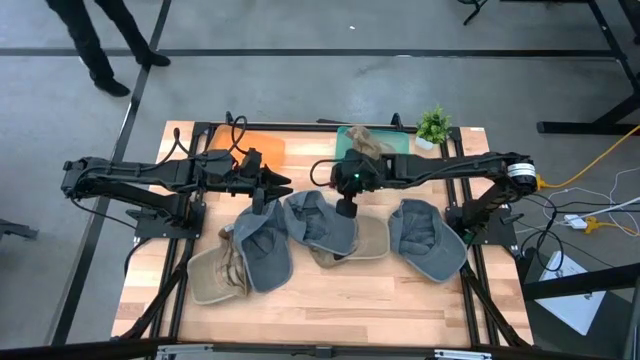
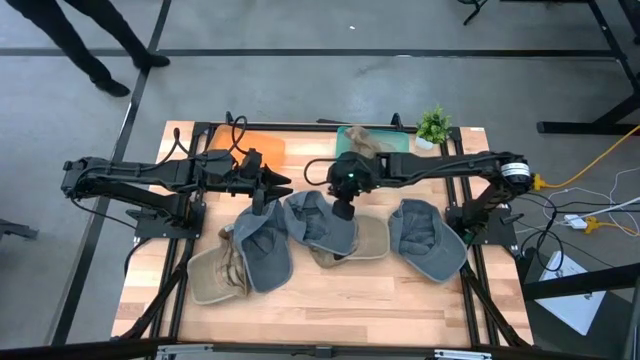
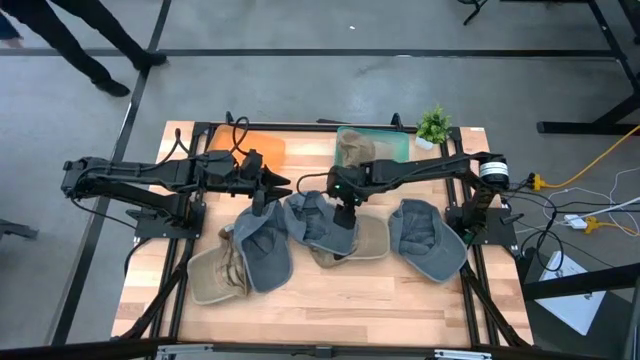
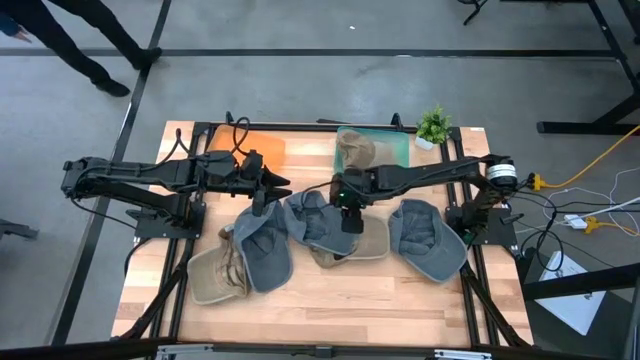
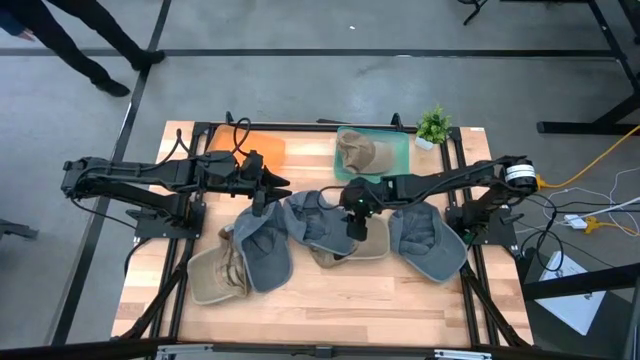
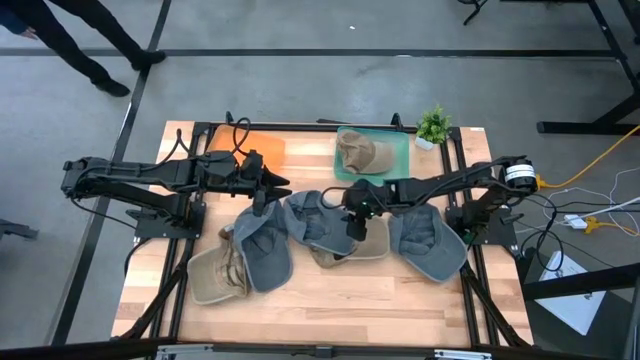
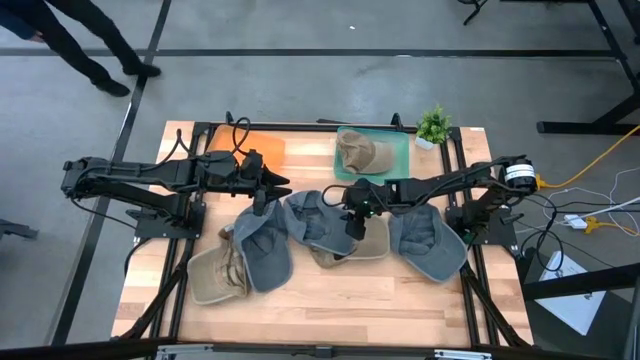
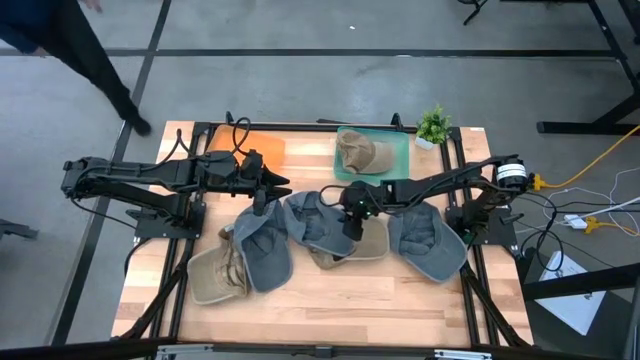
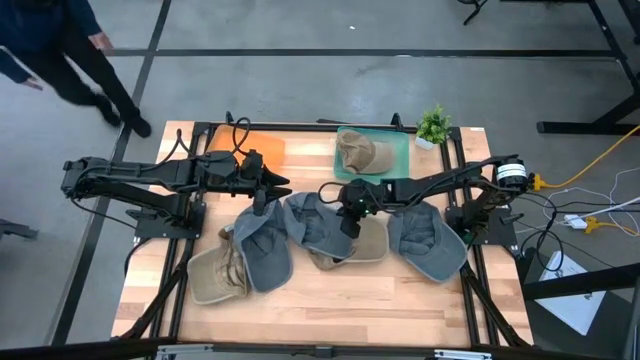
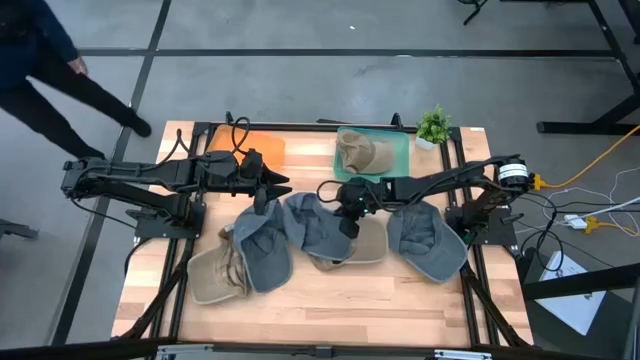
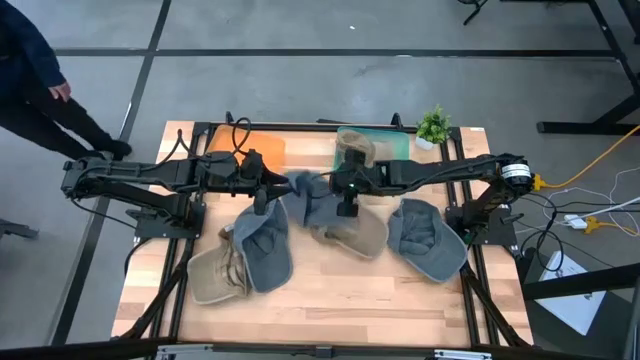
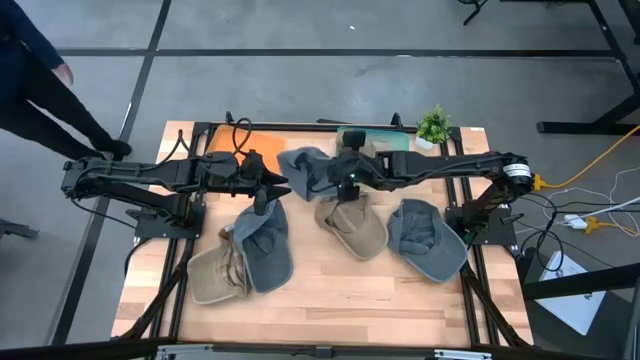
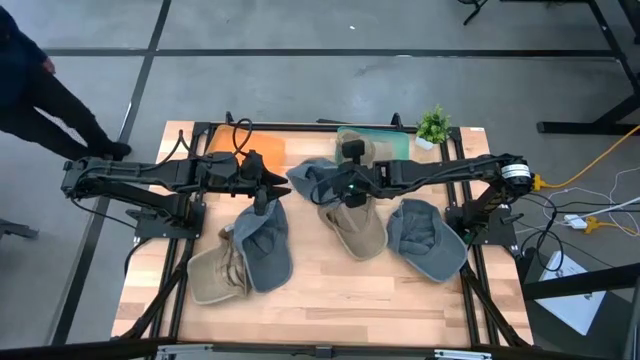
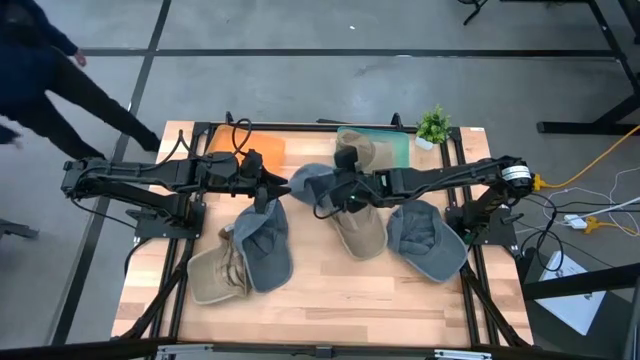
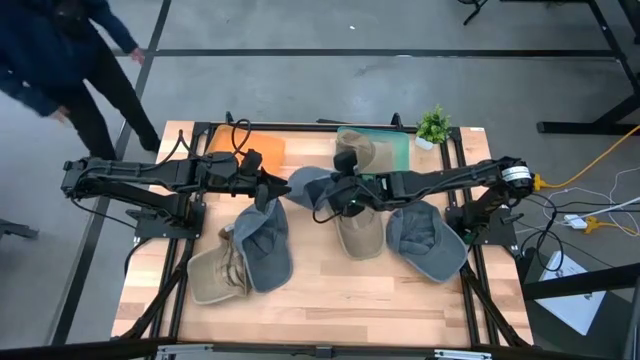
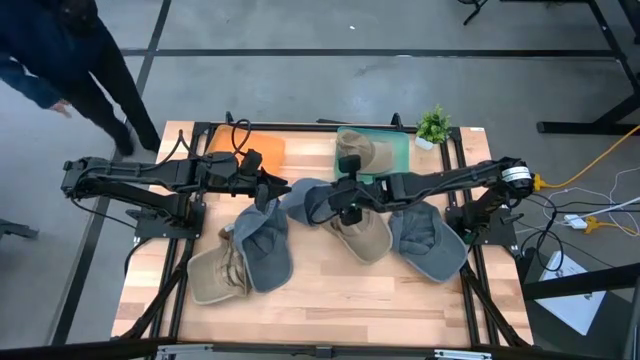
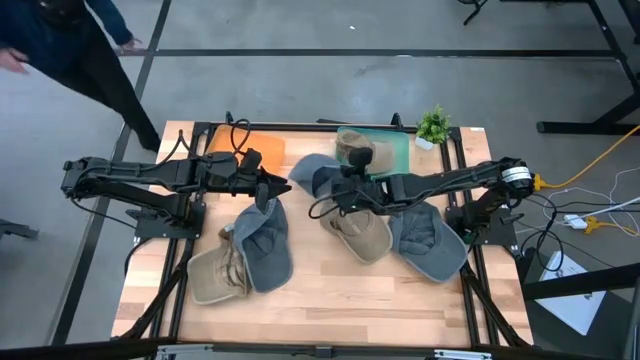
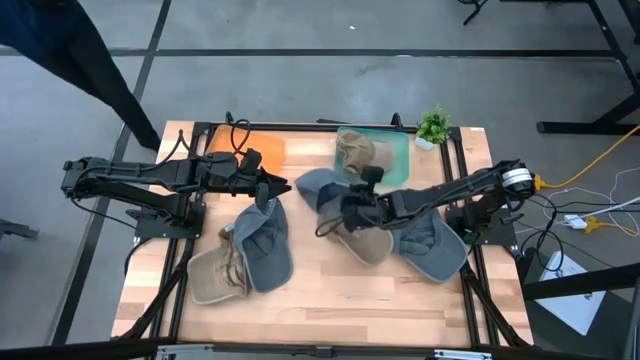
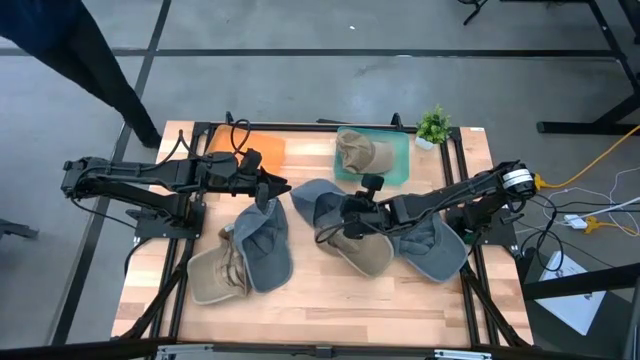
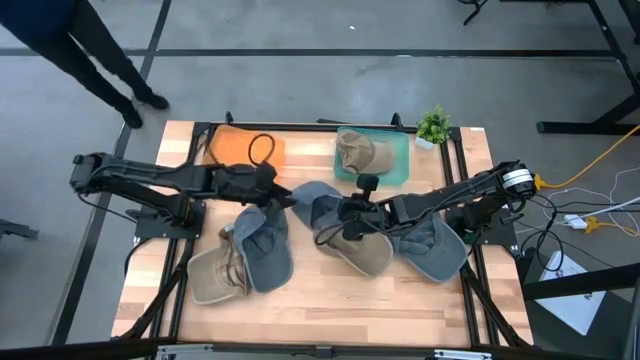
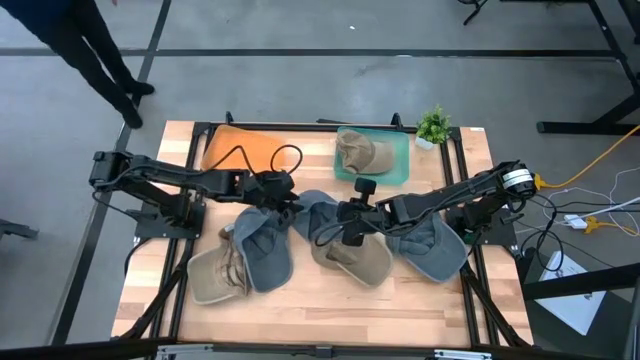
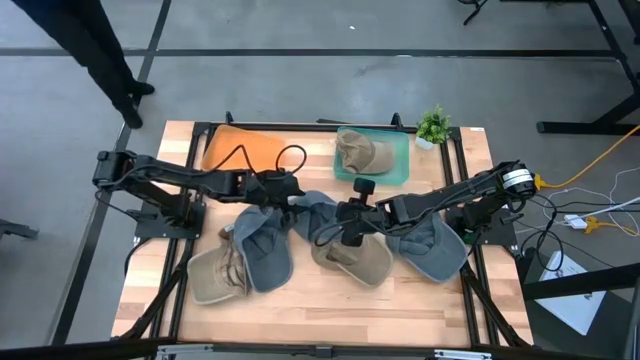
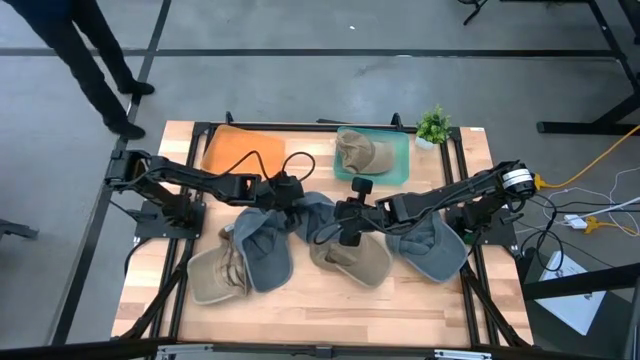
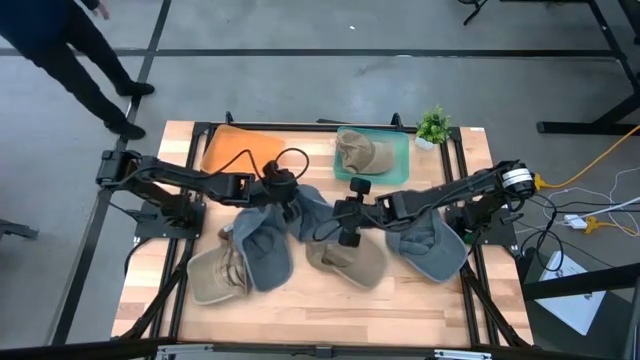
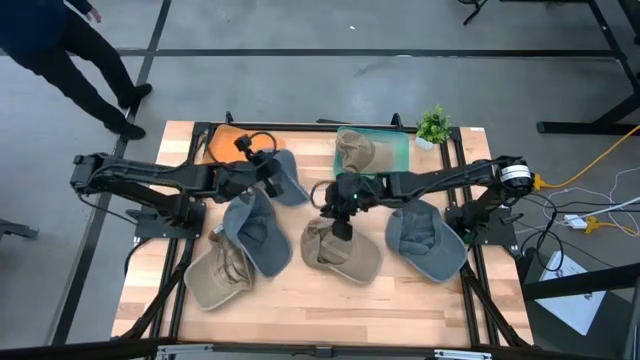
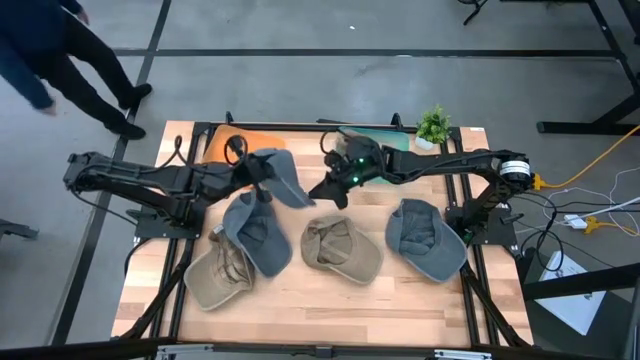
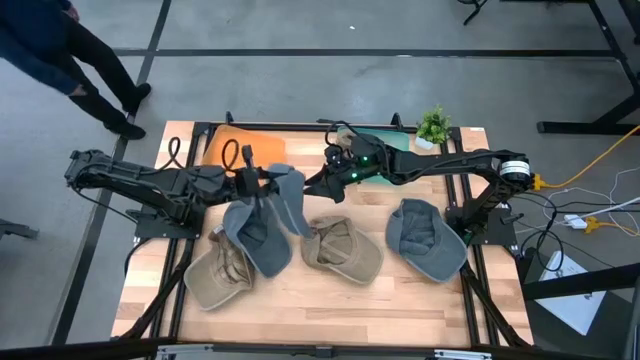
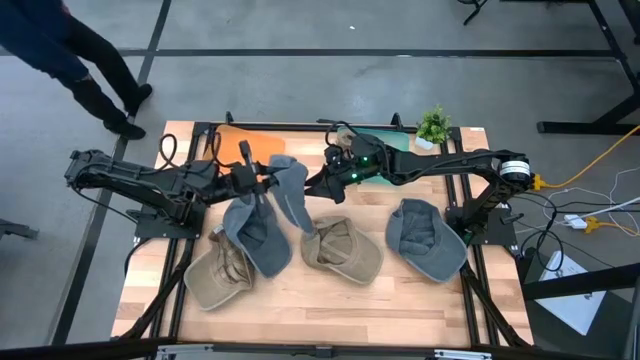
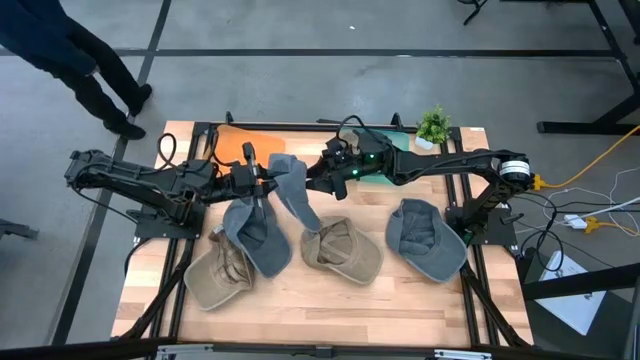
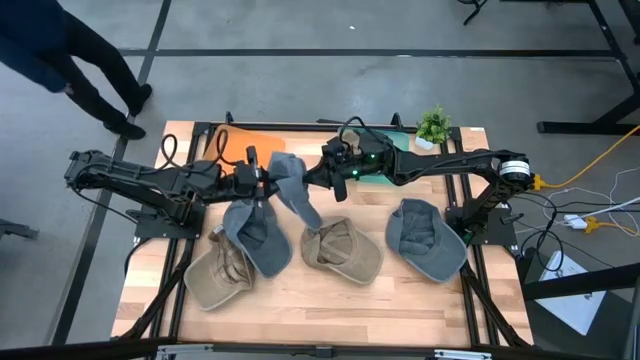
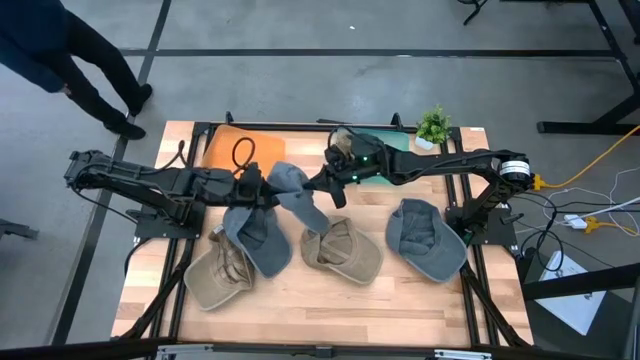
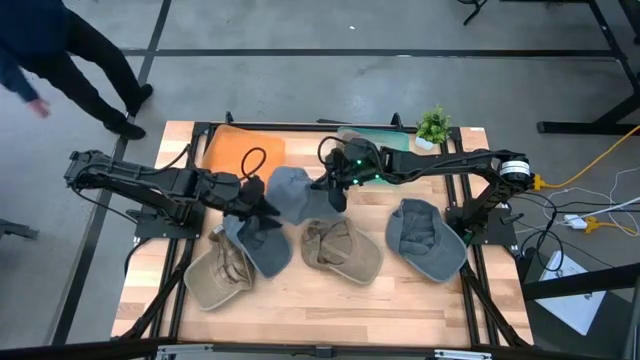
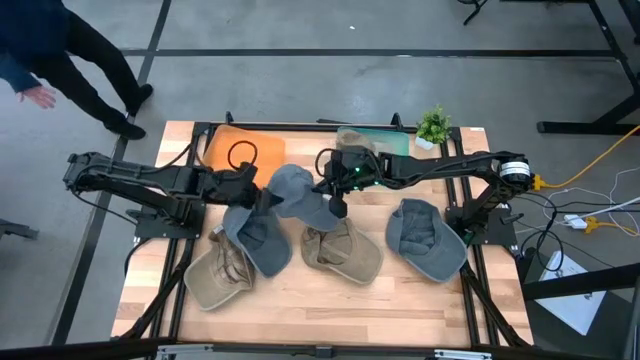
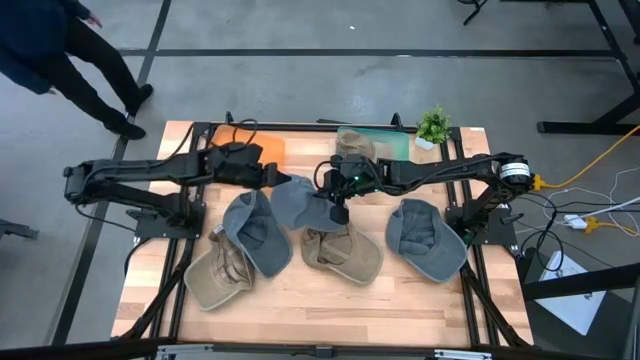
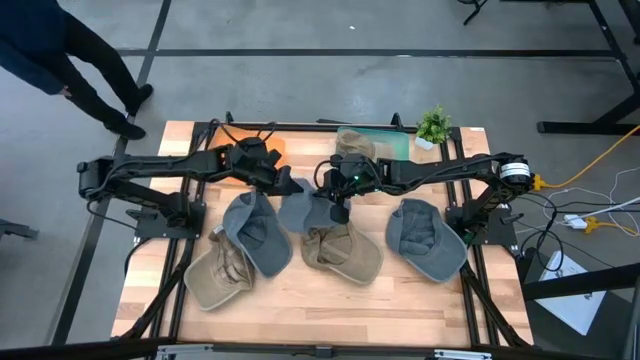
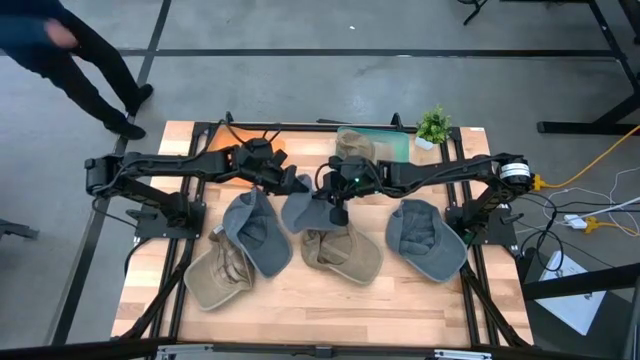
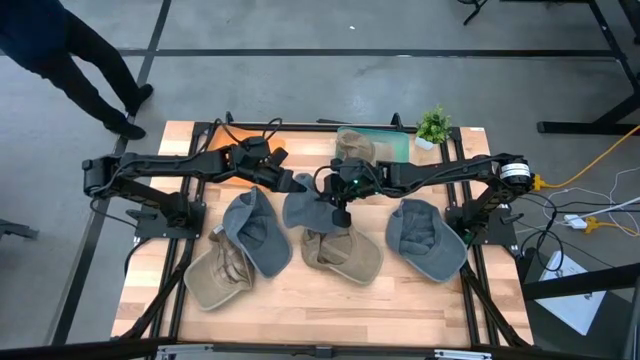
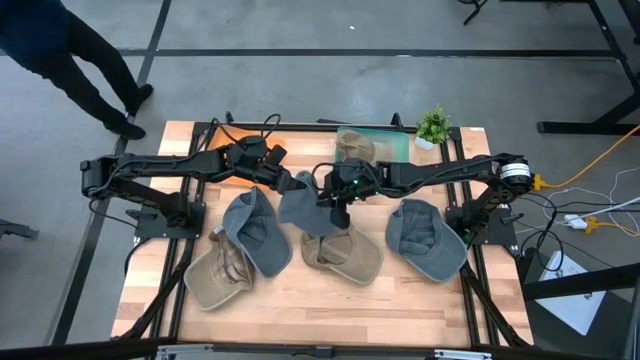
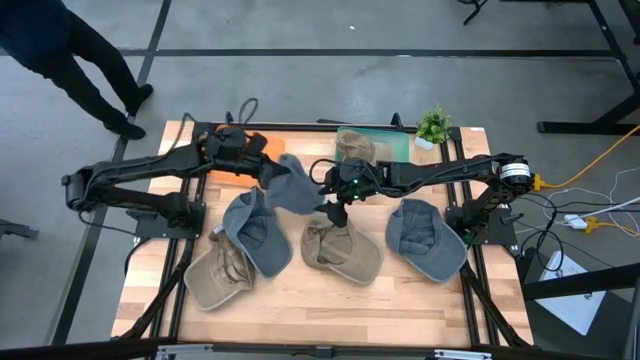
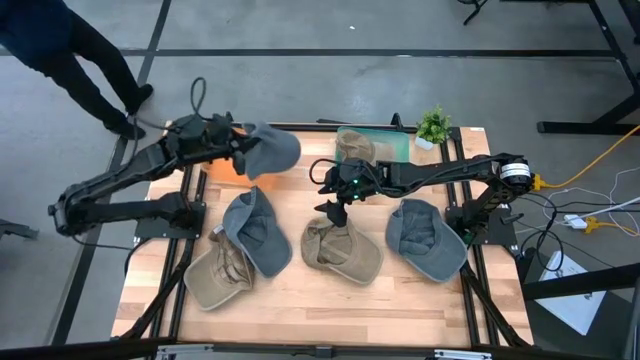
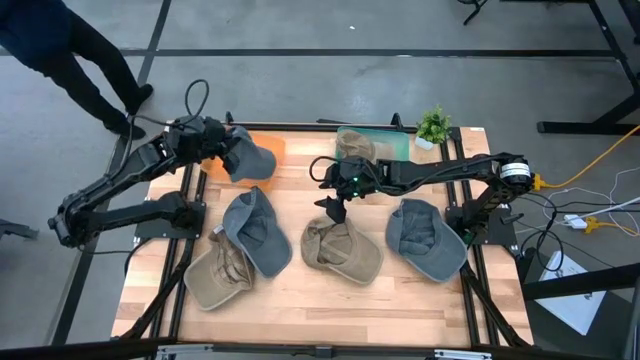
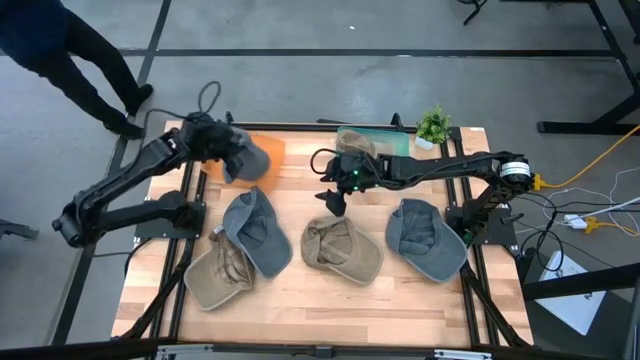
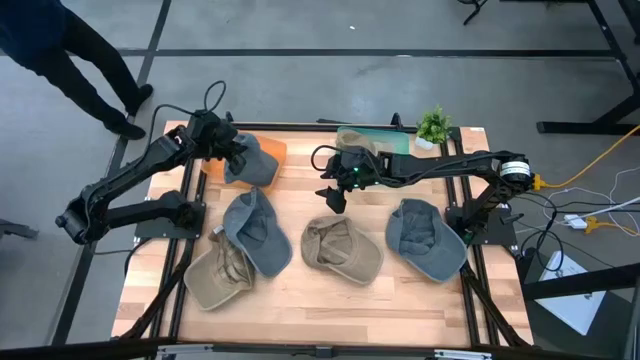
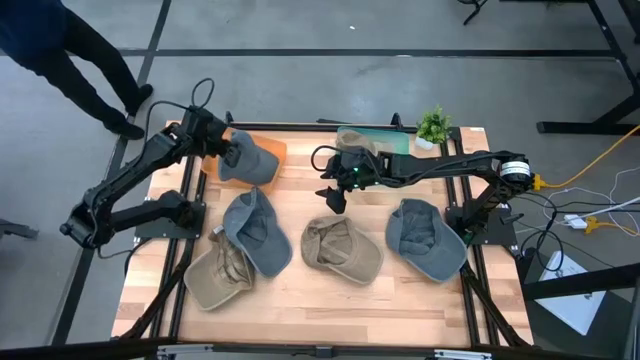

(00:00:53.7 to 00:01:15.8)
Task: Pick & Place hat
Put the middle gray cap into the orange bin
